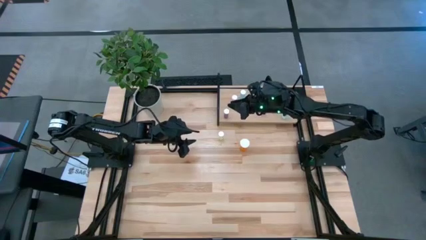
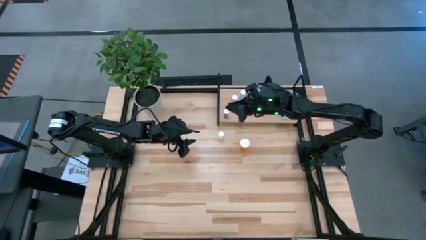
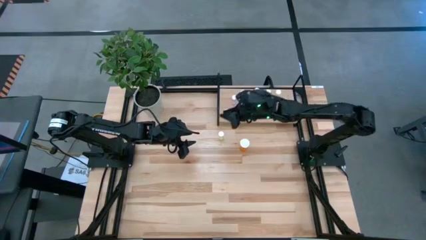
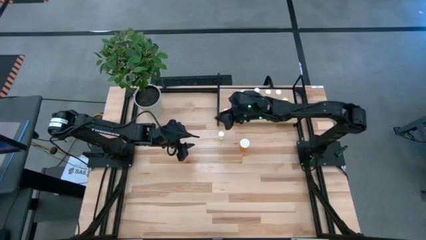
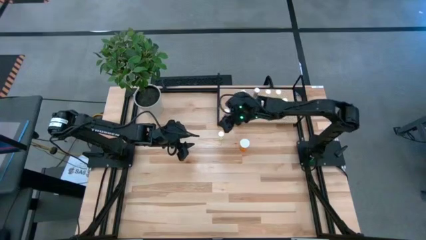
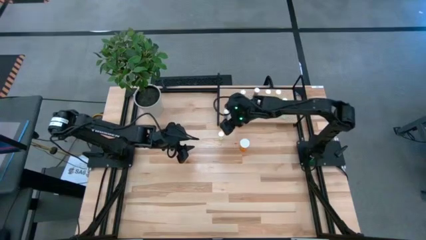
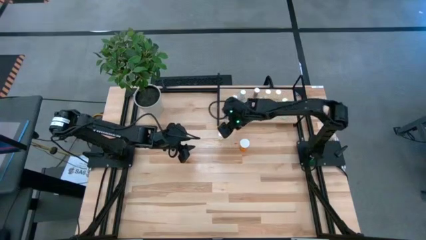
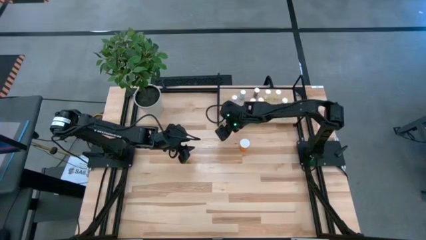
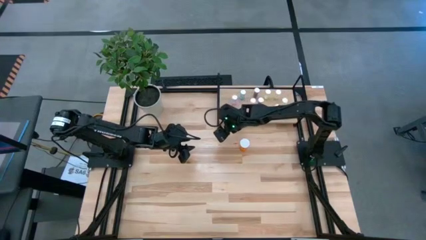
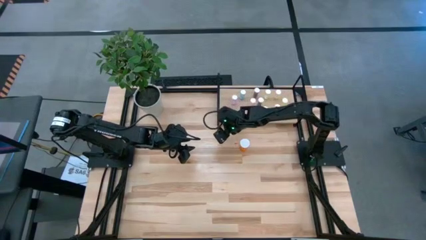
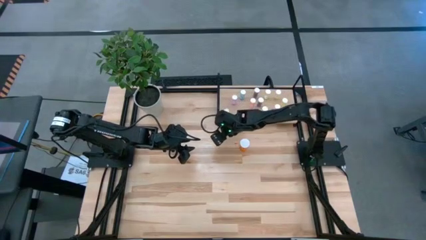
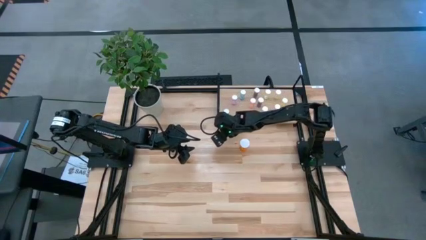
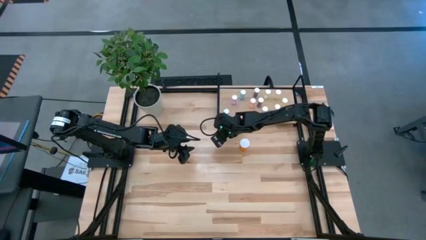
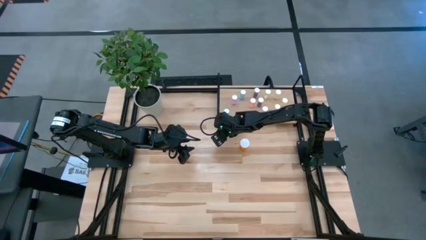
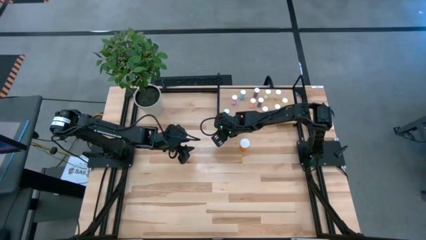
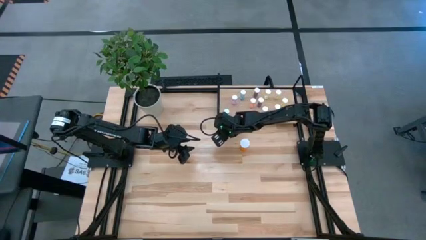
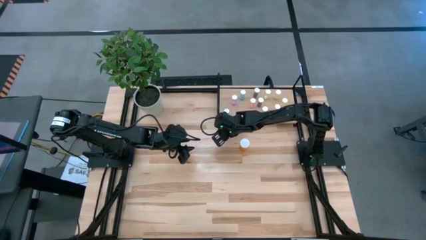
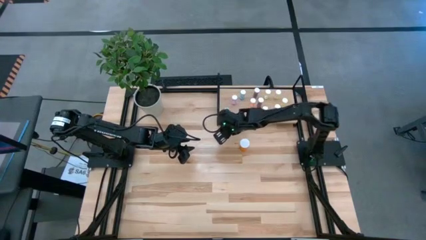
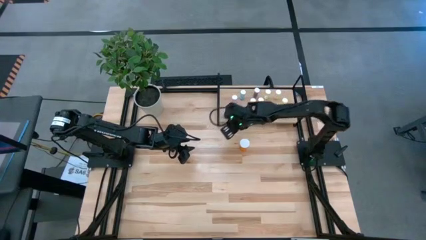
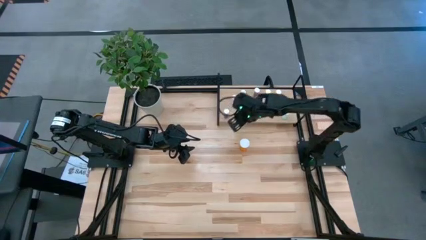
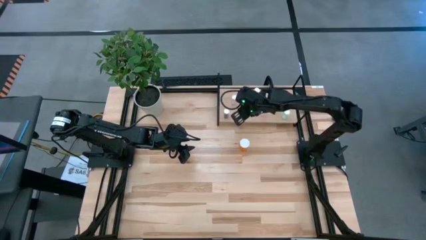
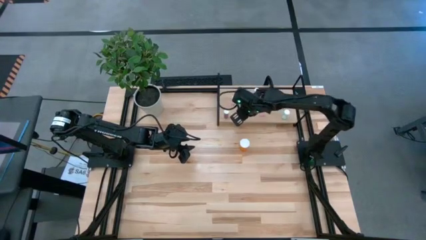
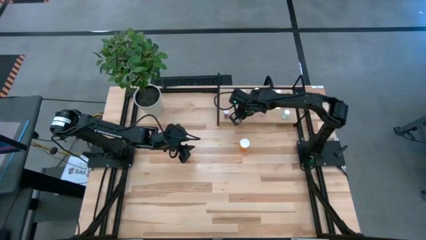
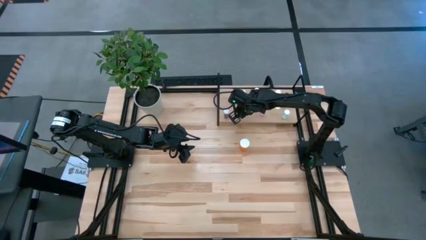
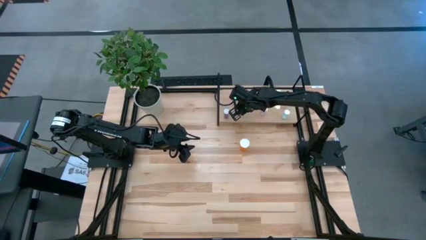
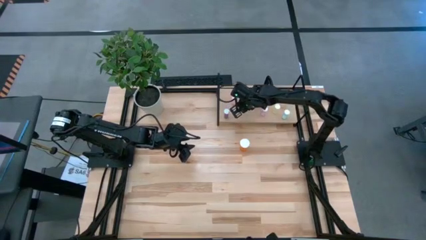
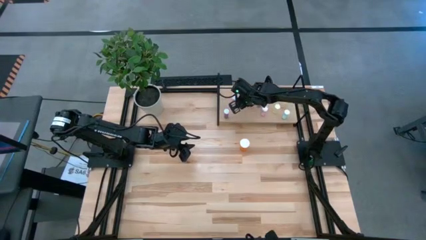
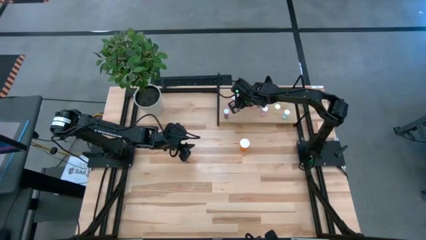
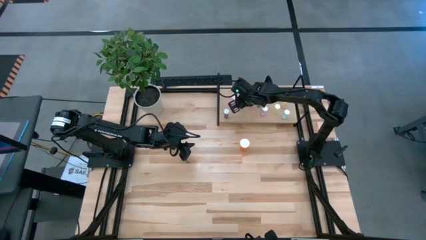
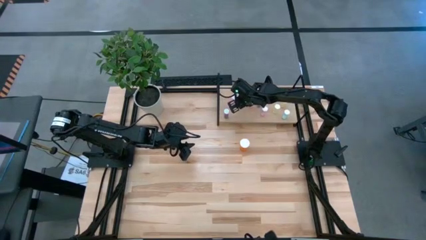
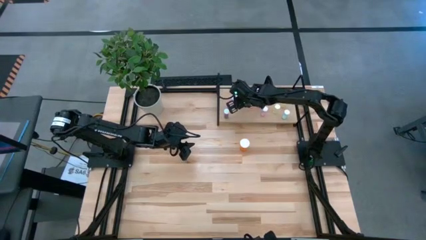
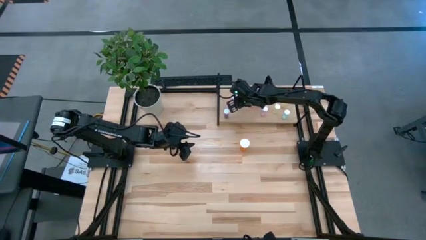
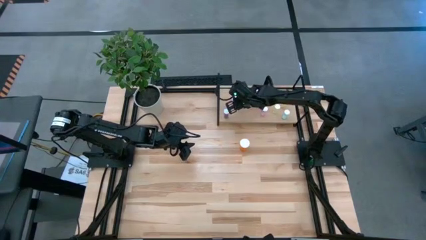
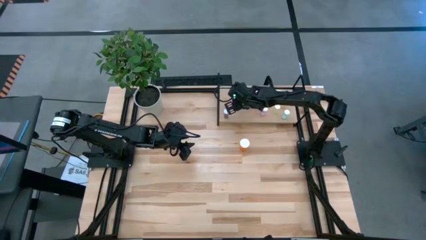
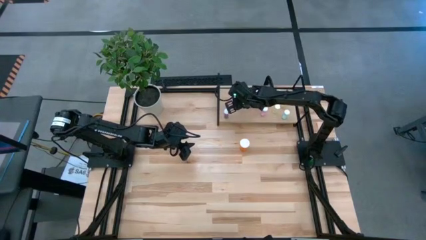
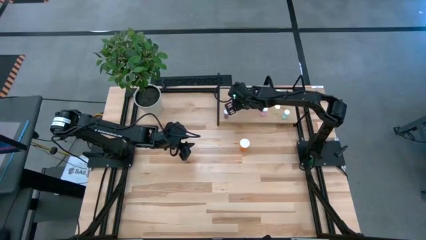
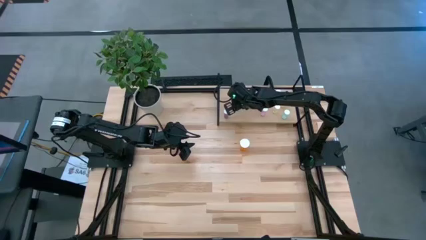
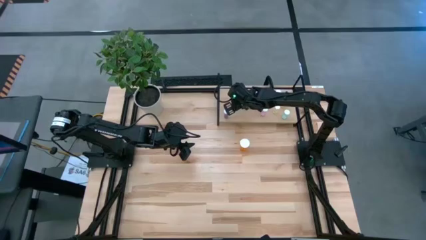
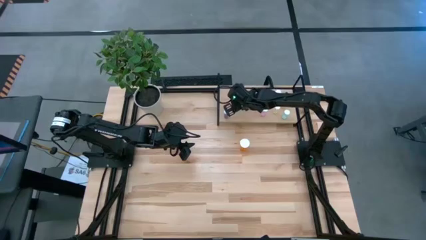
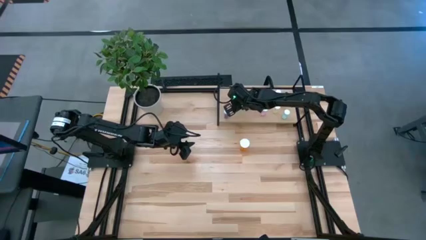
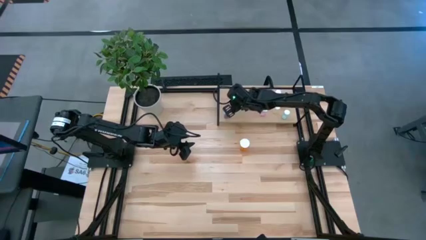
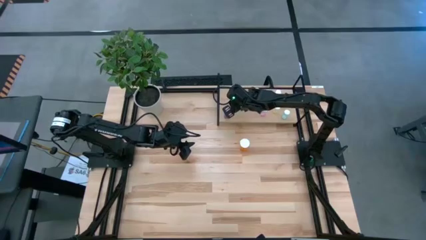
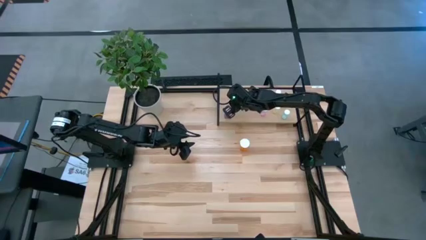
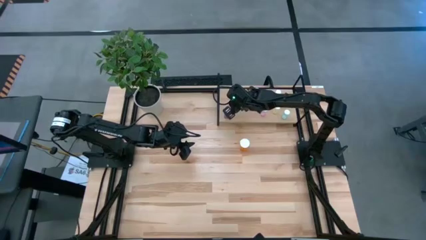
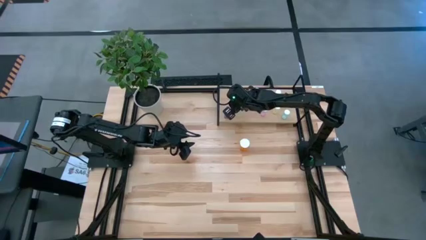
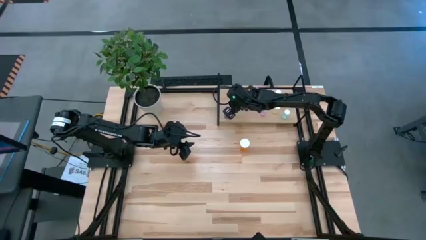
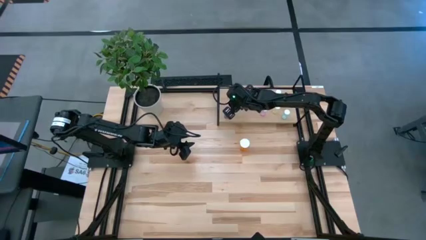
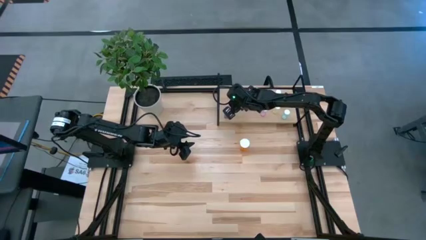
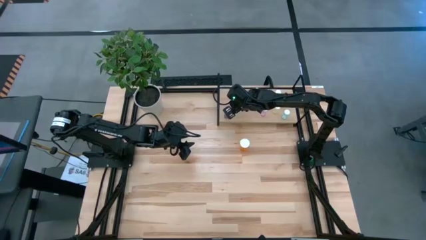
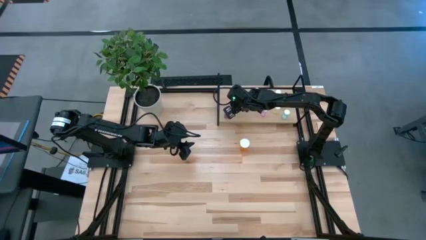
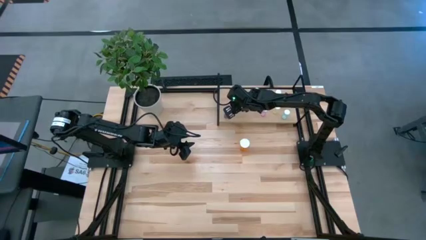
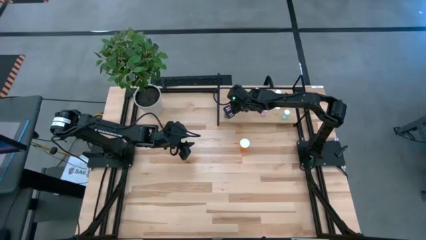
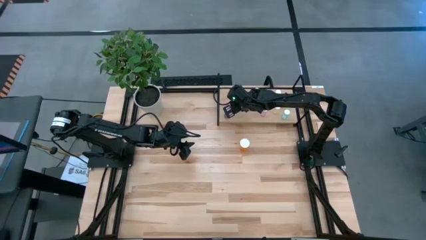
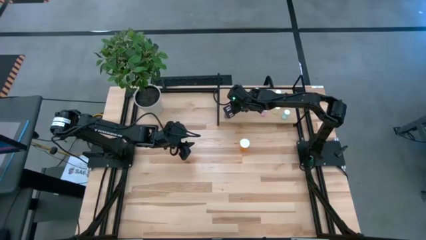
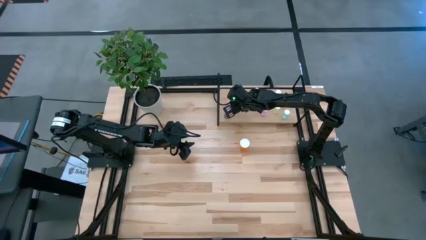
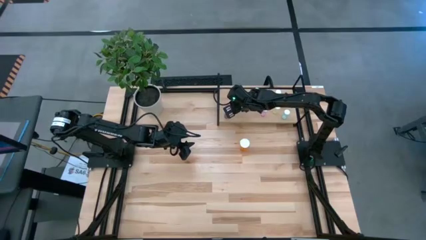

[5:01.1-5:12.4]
Task: Pick and place medicine bottles onto shelf by color
Put the yellow pill bottle on the shelf

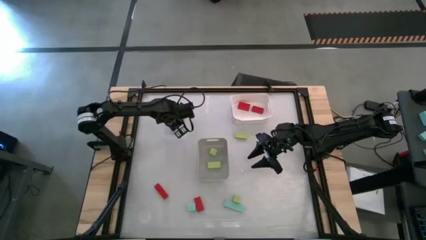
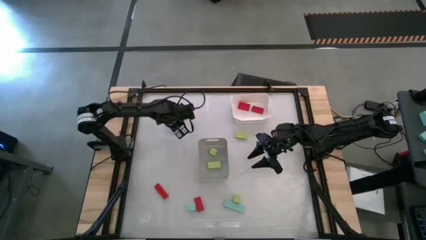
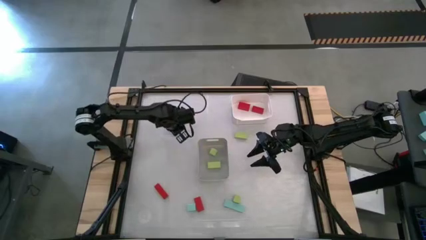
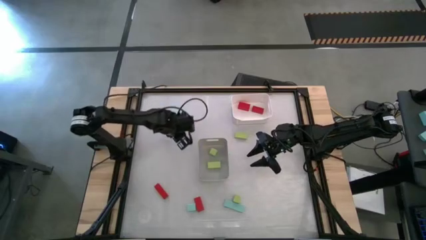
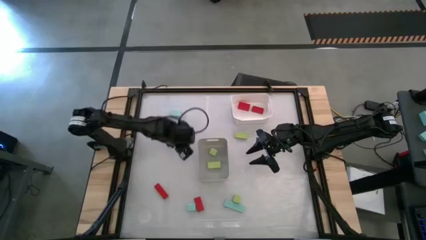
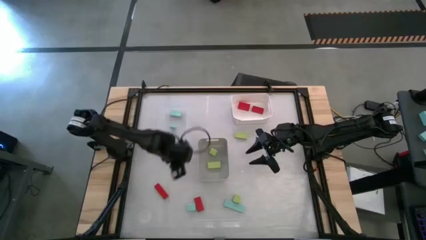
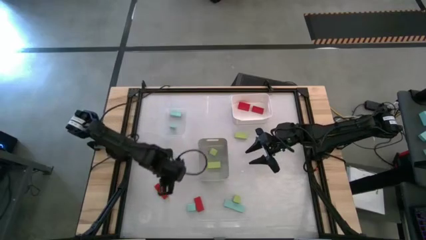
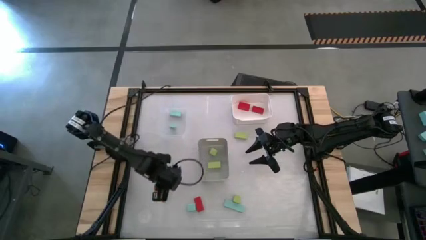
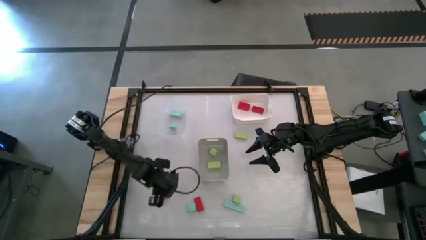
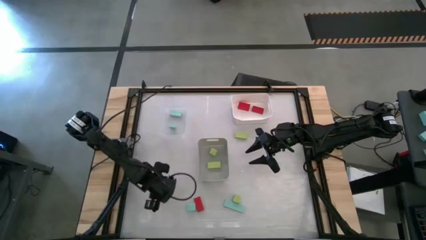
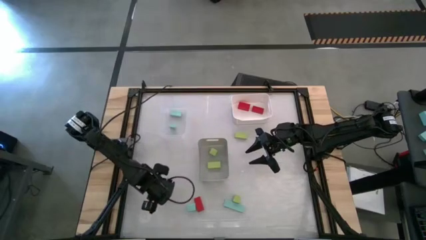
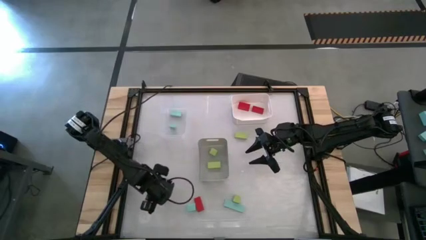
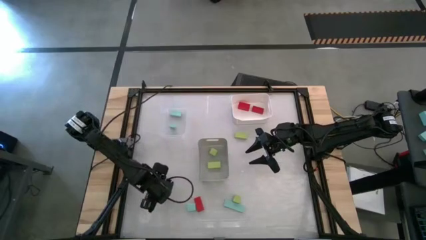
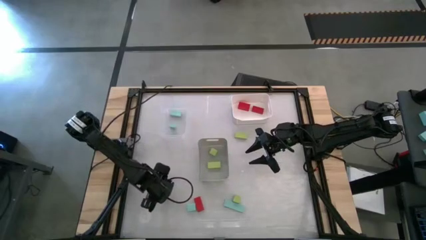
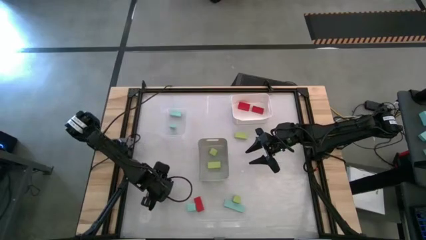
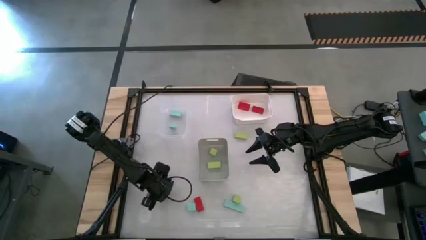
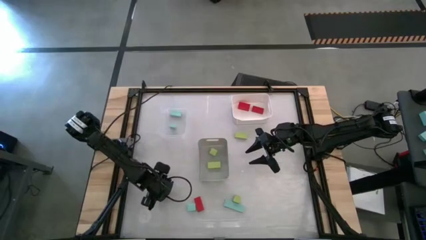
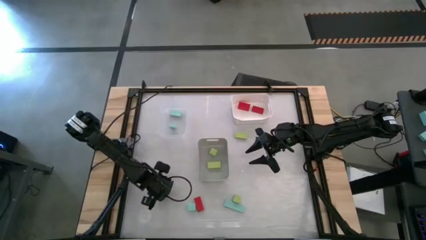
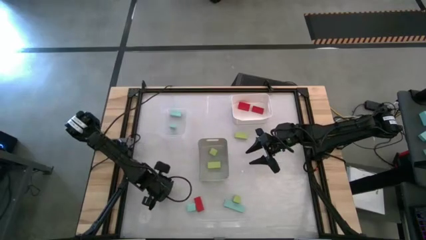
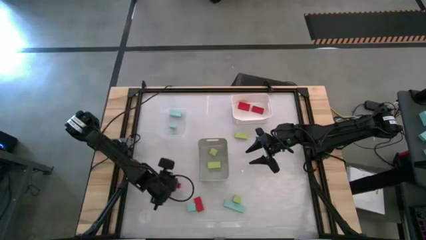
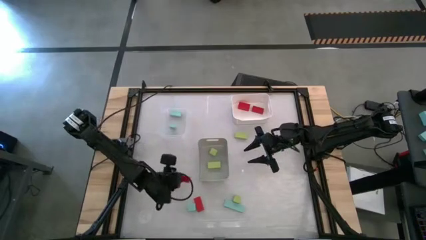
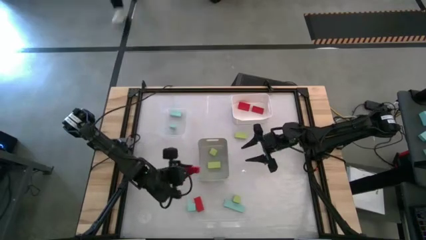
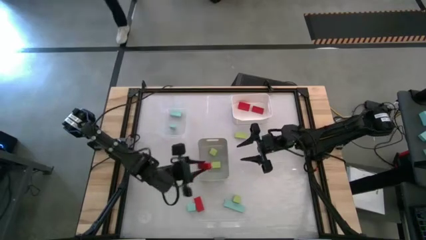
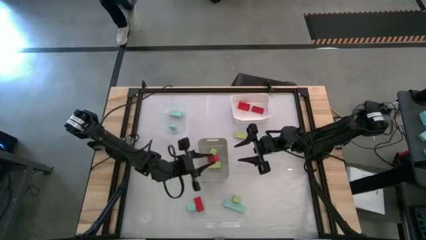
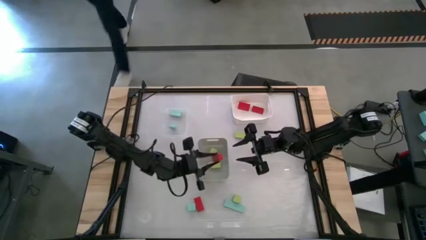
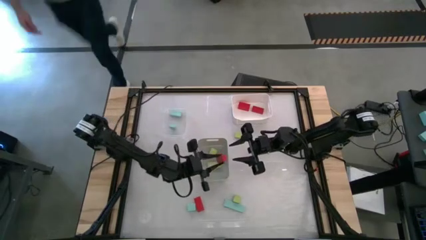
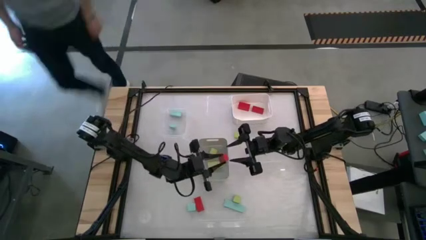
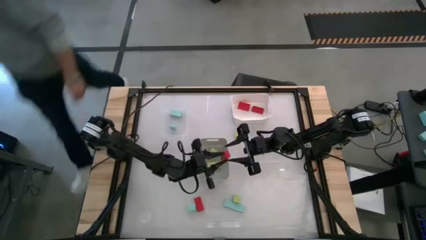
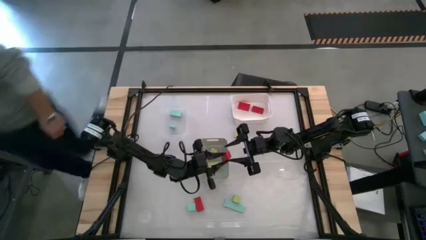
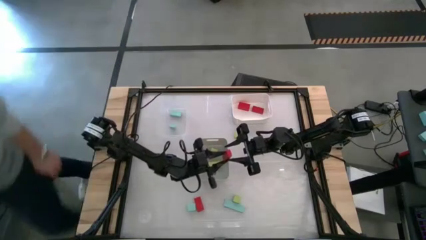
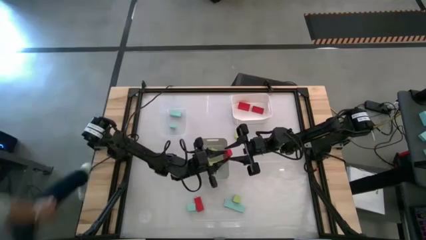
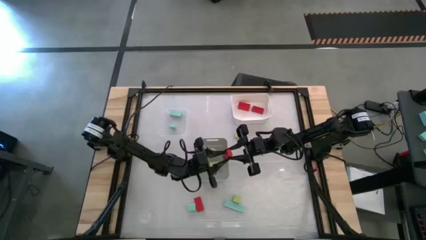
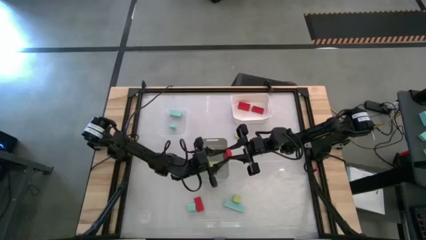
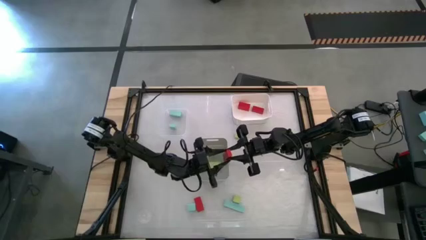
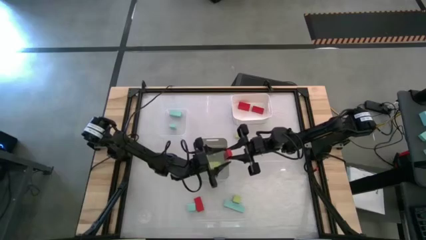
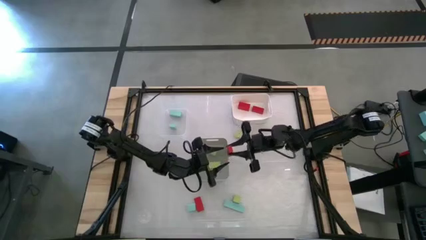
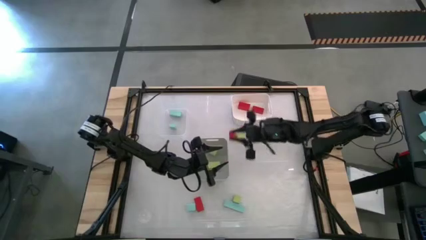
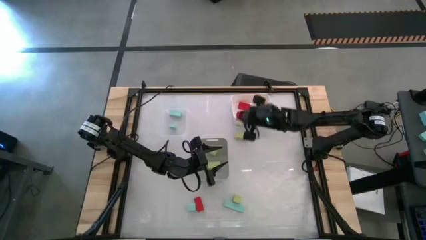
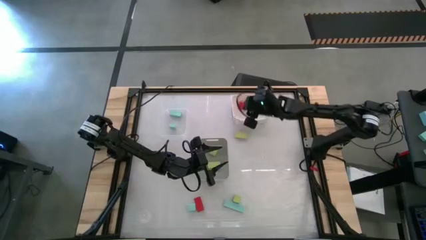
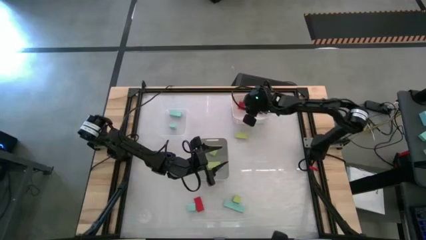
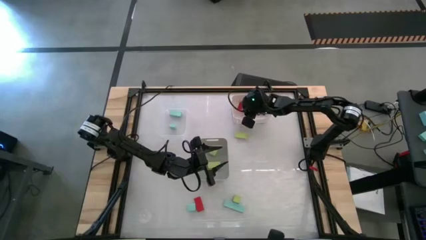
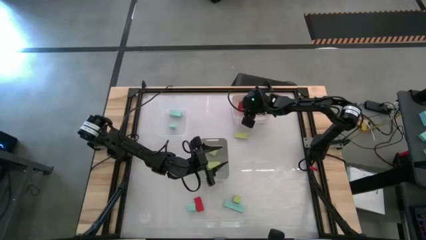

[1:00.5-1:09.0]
Task: Sort & place blocks by color
Put the red block into the white bin
